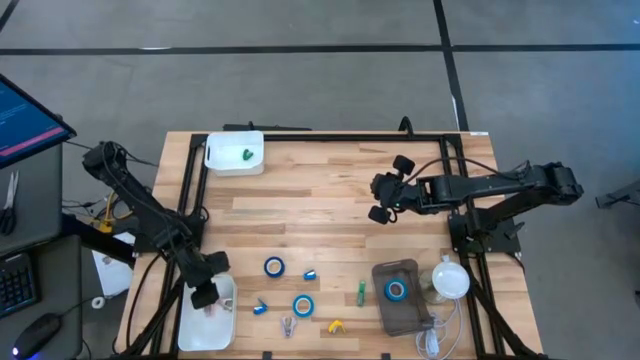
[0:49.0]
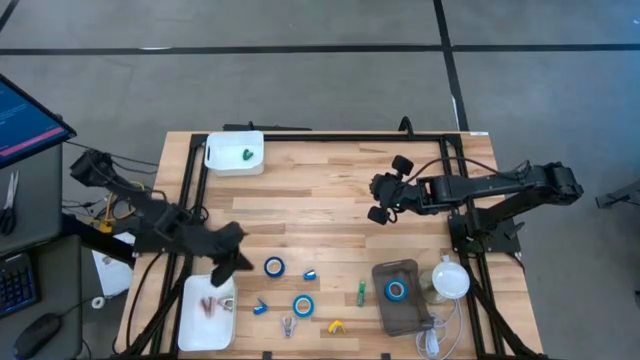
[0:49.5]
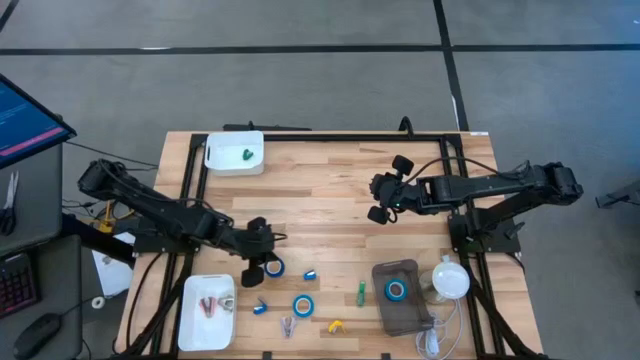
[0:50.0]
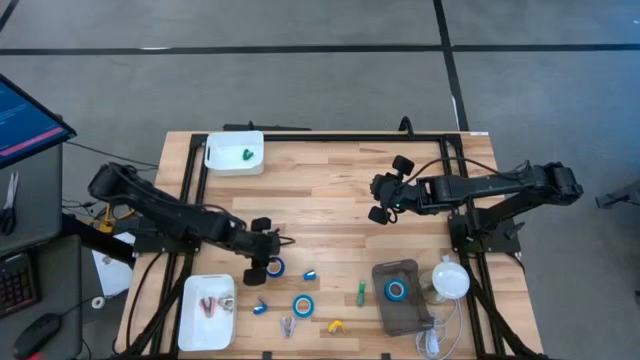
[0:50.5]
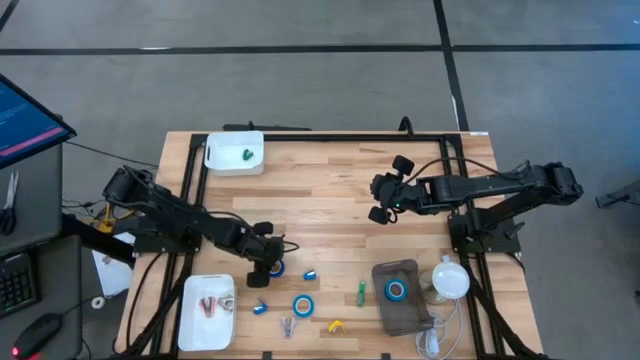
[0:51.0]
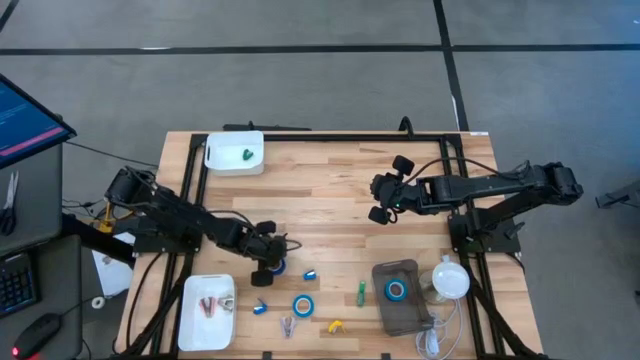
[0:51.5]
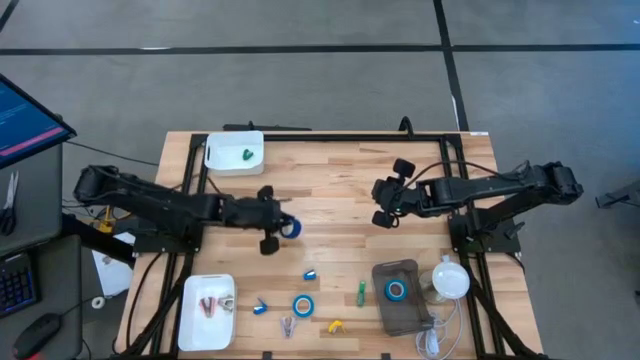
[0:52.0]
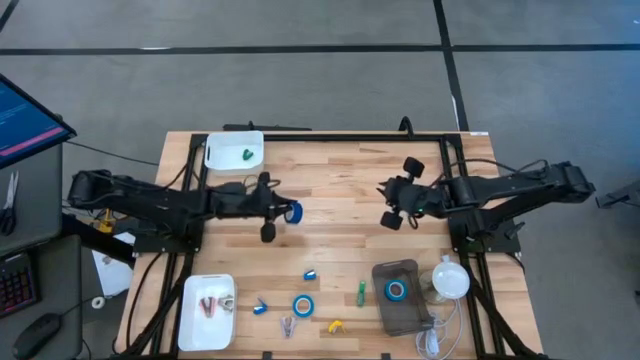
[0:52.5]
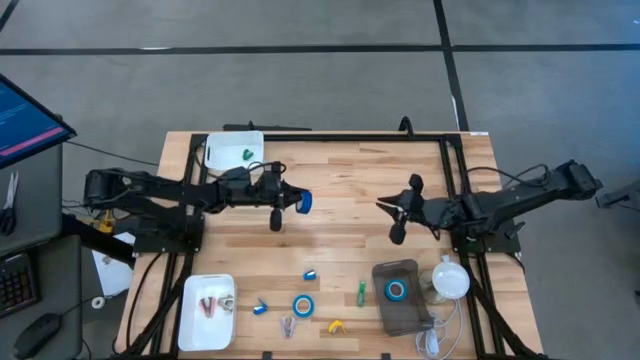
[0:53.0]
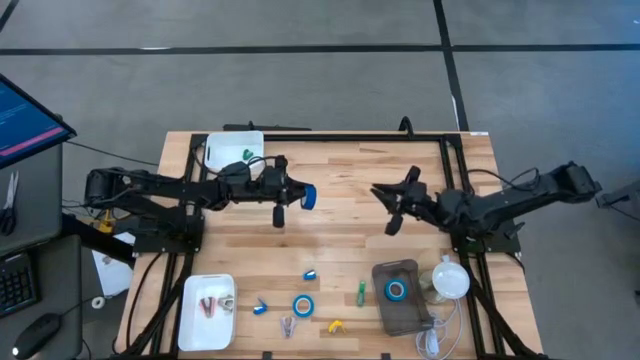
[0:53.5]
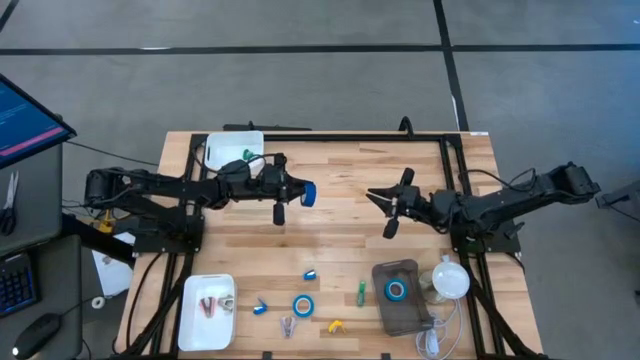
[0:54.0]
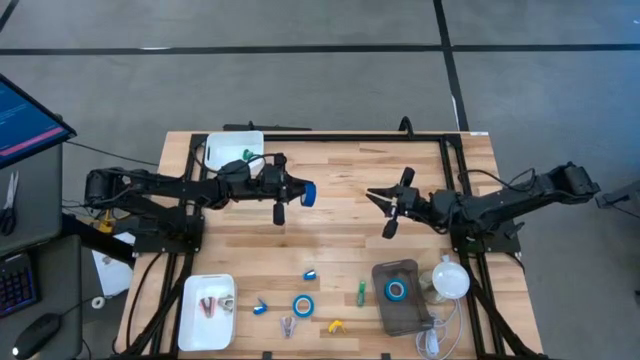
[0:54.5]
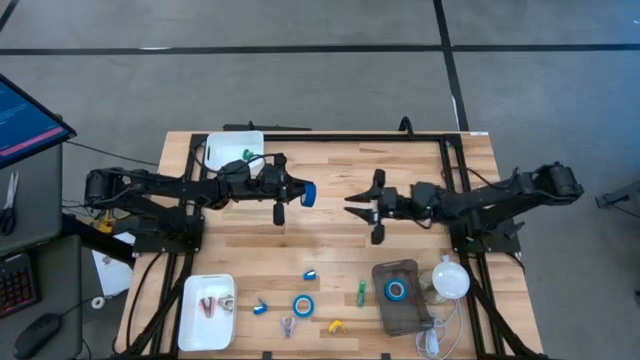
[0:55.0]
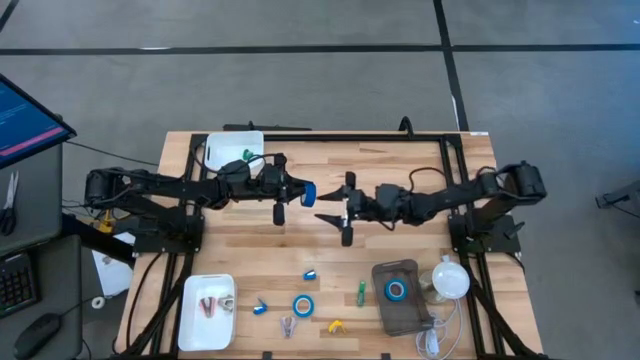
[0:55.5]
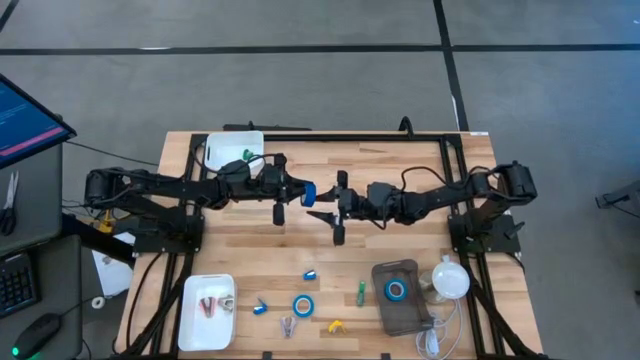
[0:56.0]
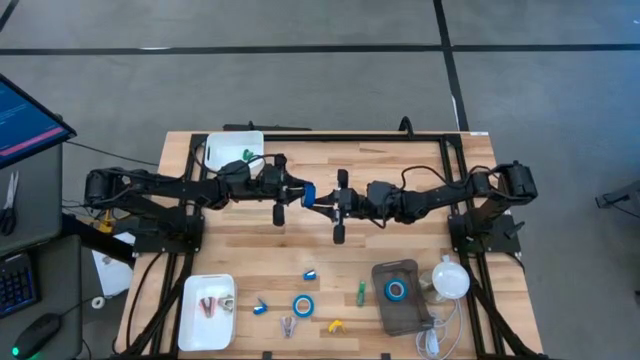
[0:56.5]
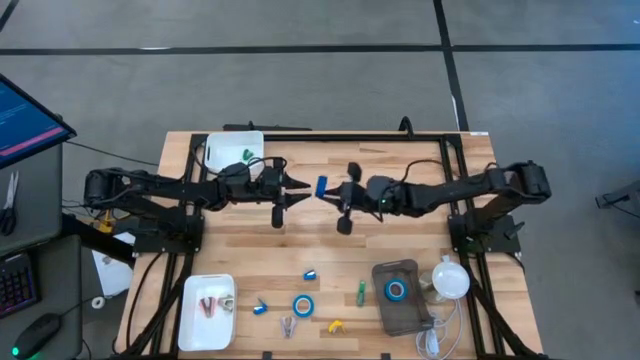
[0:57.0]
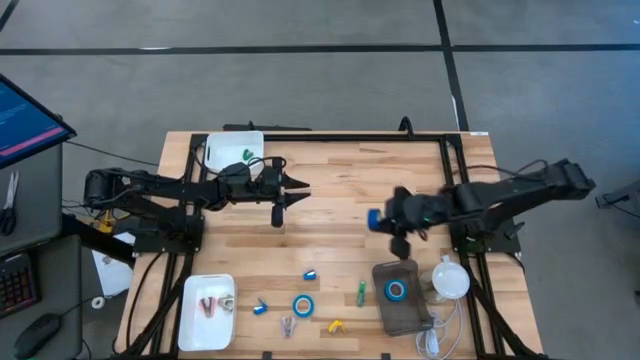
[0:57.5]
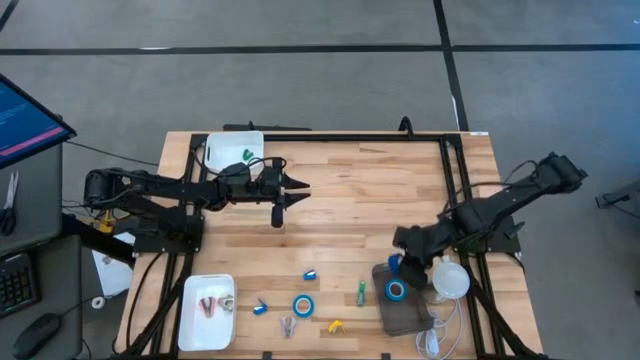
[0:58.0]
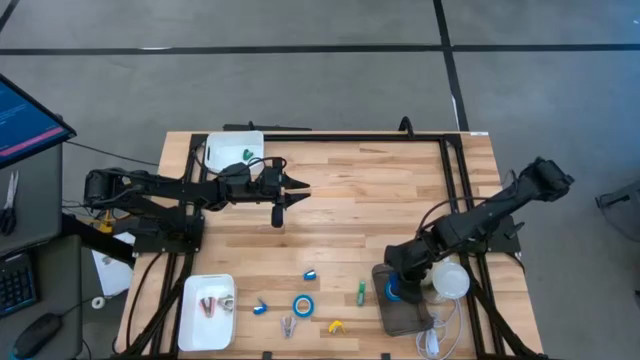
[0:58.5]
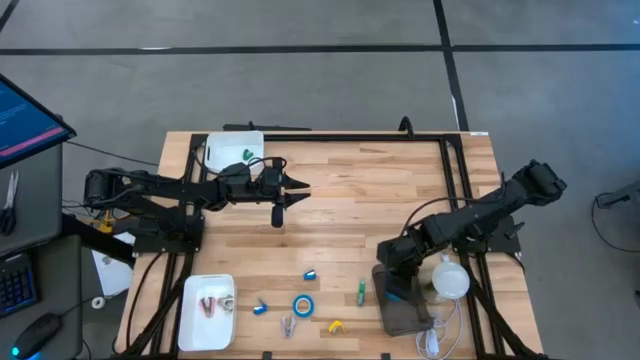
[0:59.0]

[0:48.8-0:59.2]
Task: Pick and place Stapler, Stapler remover, tape
Put the blue tape into the black bin

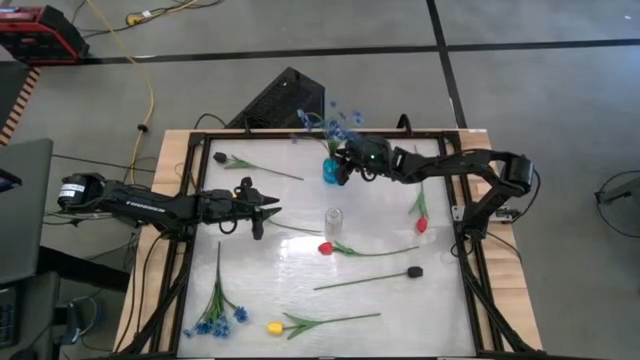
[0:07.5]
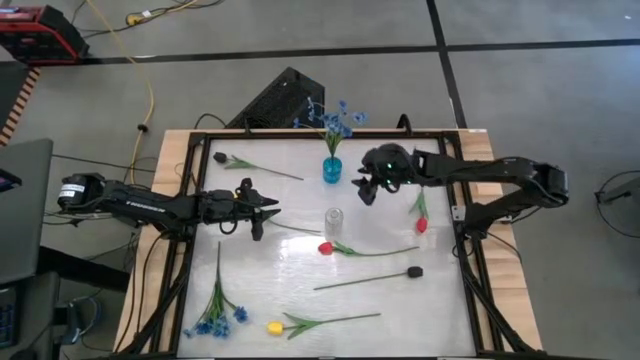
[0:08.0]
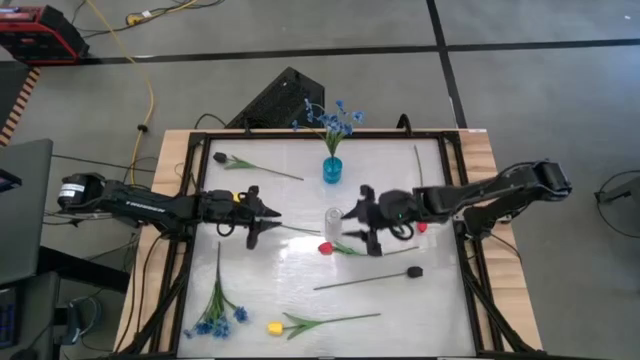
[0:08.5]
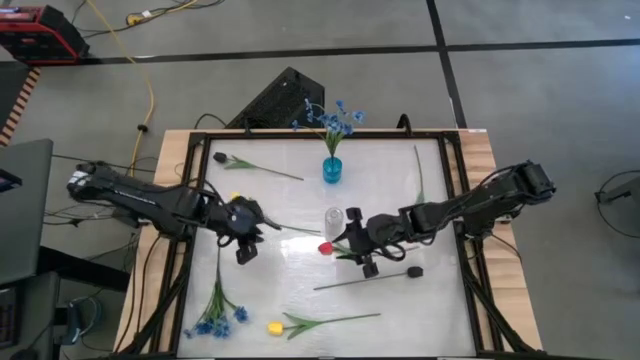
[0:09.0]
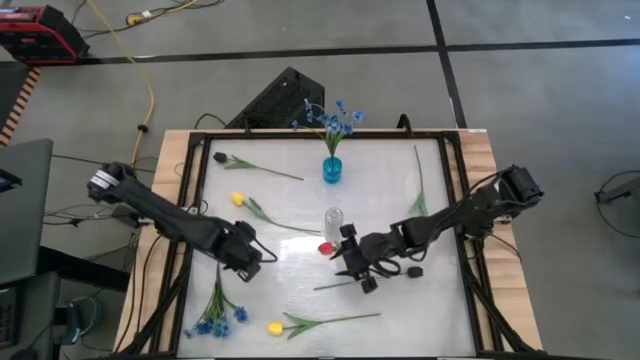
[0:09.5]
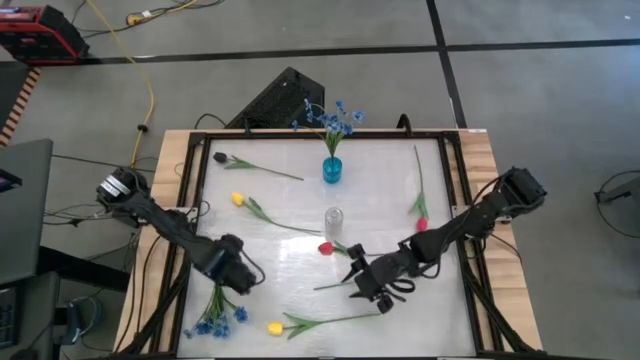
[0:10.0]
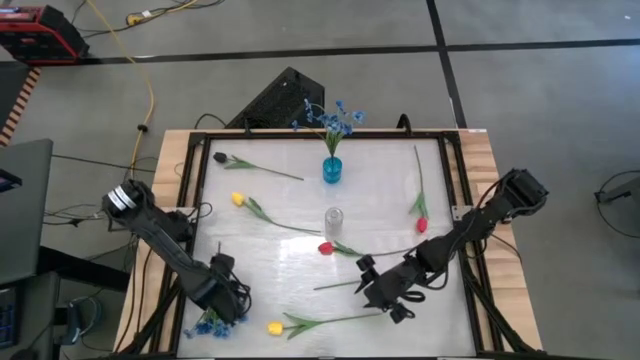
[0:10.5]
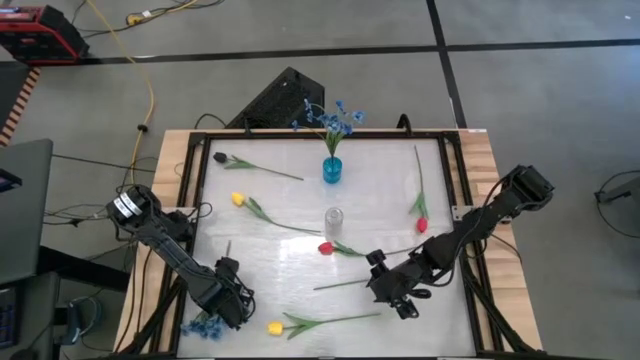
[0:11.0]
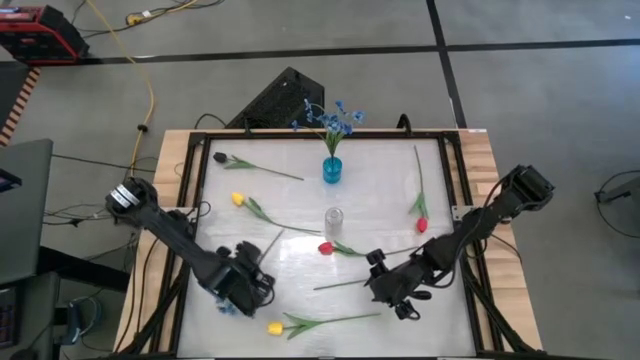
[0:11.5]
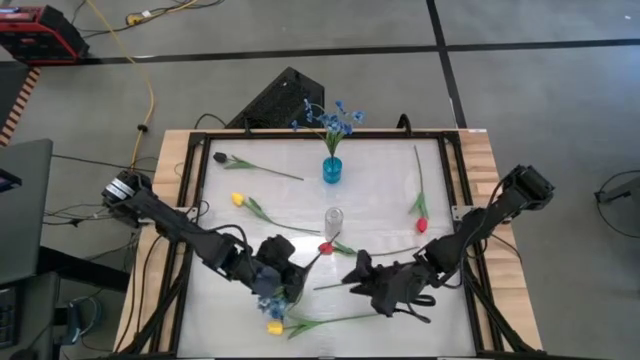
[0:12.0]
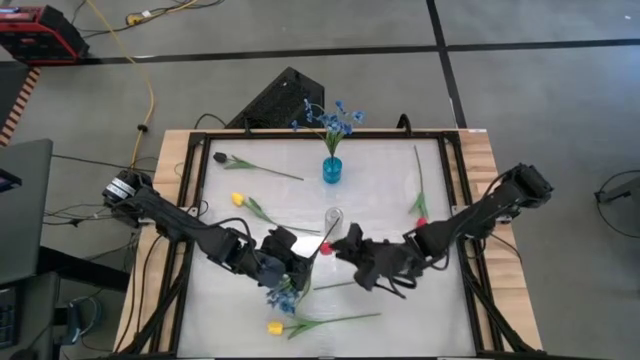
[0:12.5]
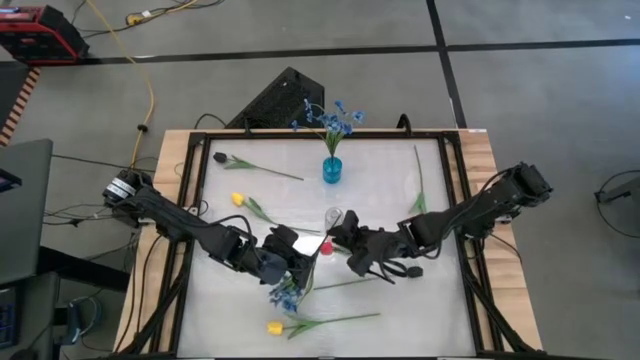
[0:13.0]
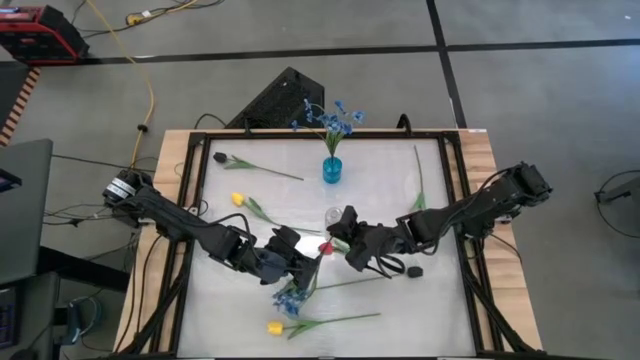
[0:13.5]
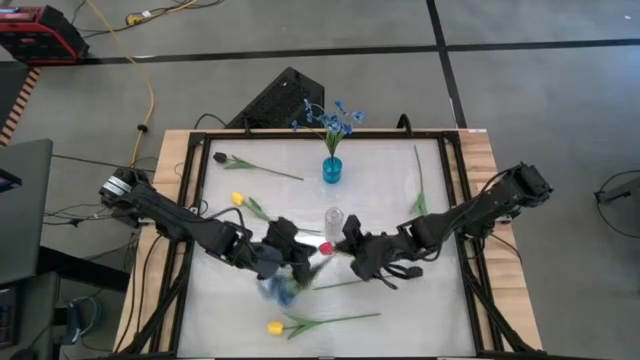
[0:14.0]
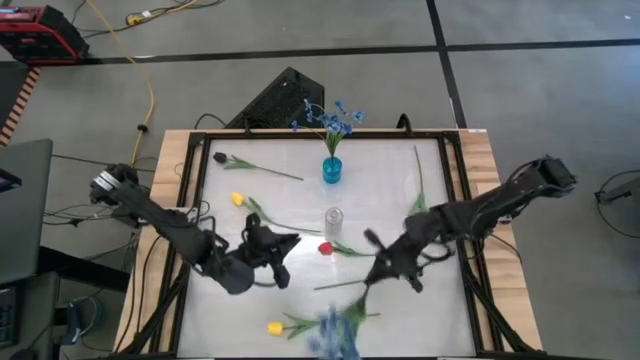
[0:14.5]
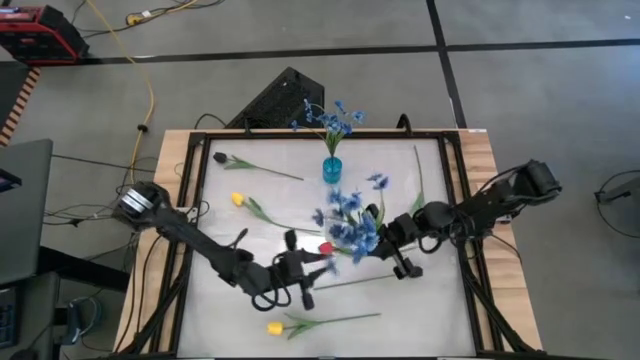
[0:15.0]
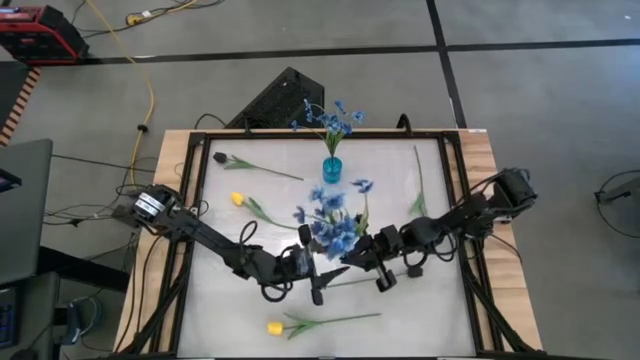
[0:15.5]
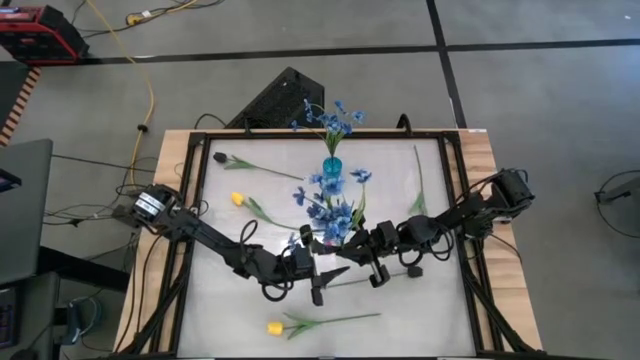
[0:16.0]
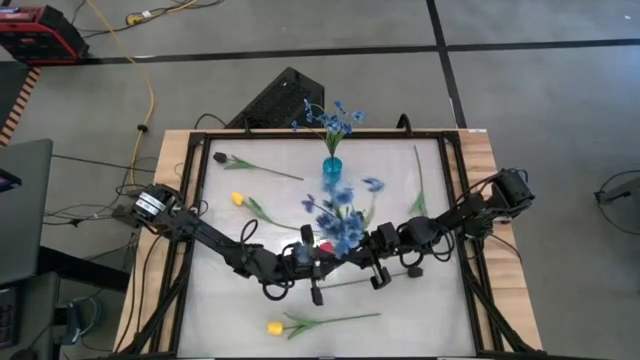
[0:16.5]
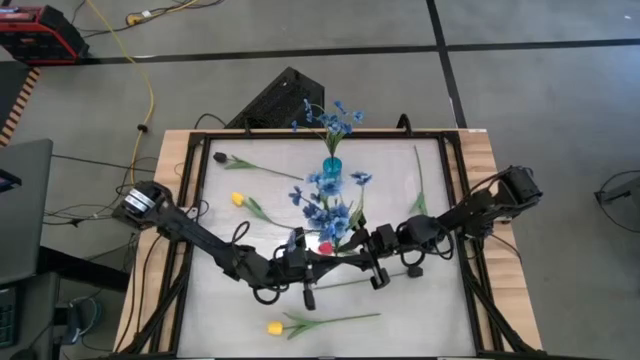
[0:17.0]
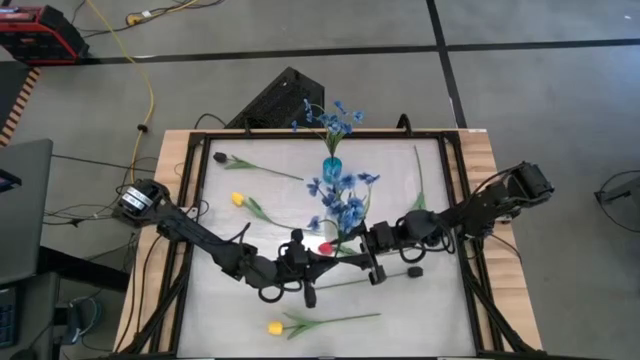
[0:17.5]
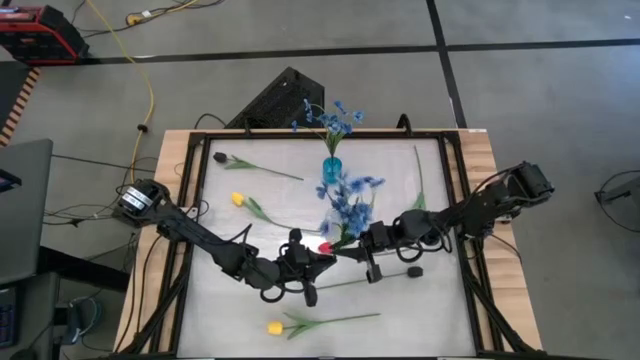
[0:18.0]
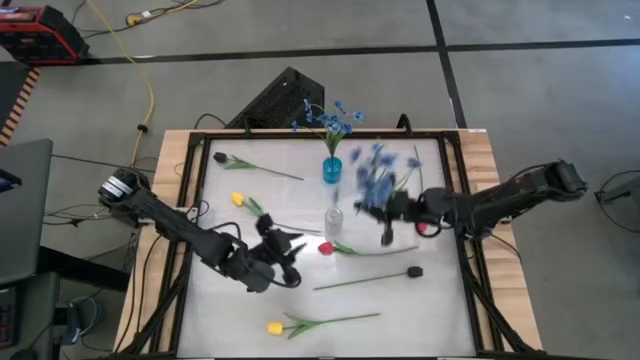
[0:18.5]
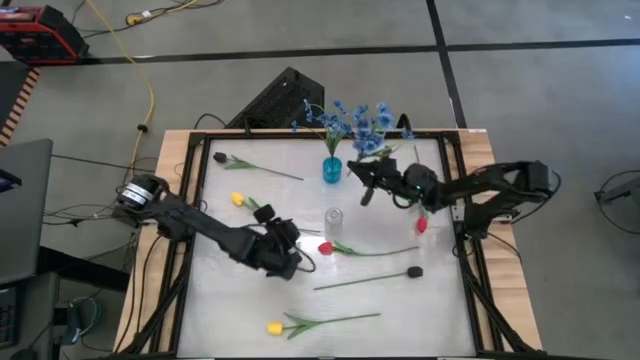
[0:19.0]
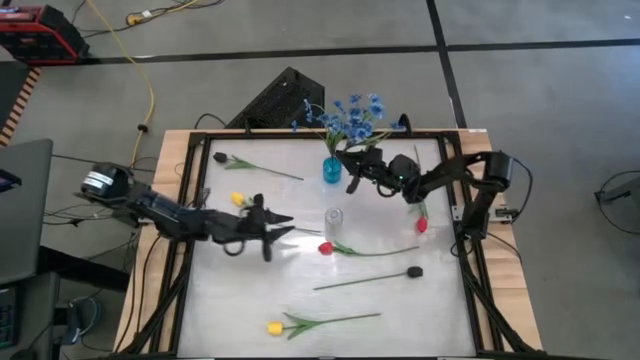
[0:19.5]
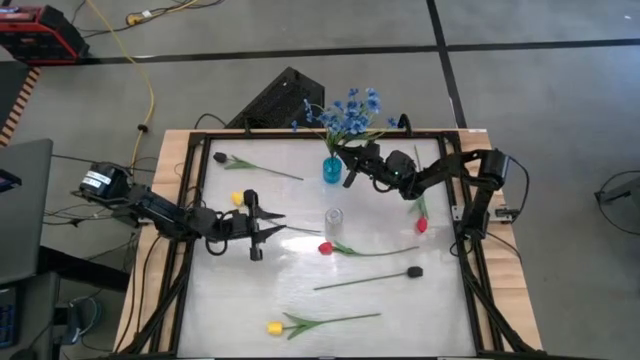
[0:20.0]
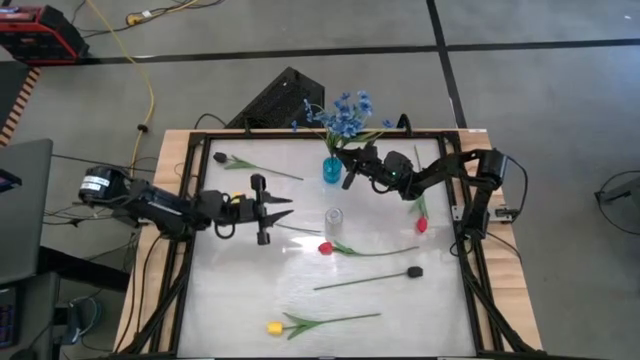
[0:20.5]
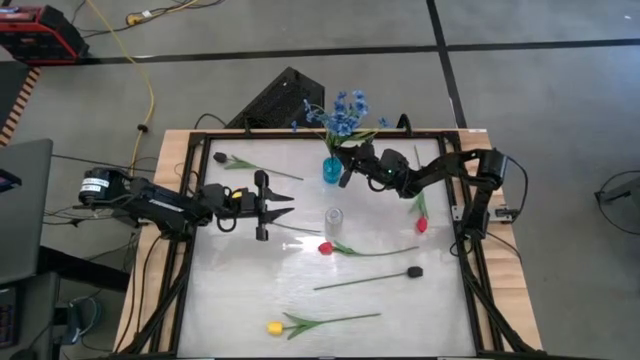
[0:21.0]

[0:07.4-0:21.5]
Task: Sort flowers into vase by color
Put the blue flowers into the blue vase
